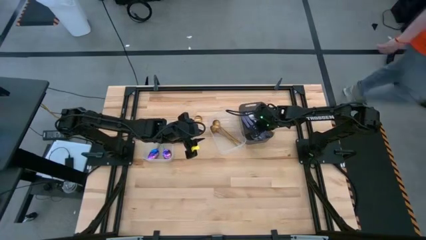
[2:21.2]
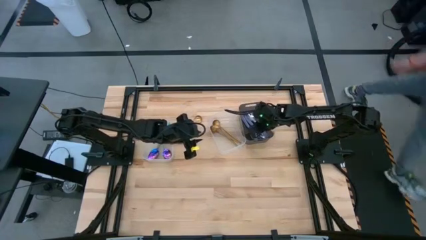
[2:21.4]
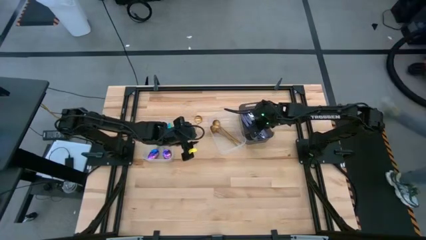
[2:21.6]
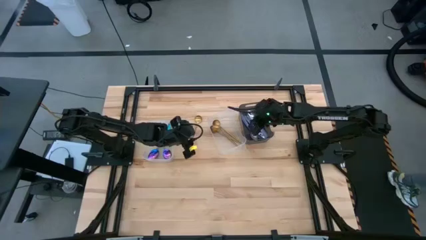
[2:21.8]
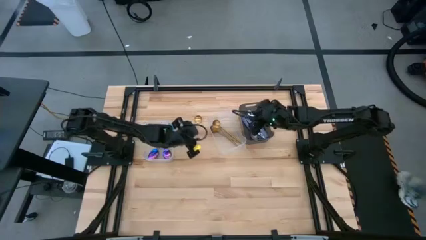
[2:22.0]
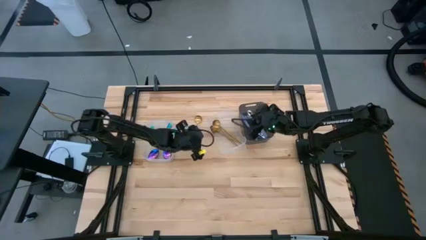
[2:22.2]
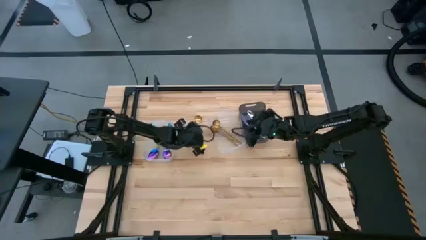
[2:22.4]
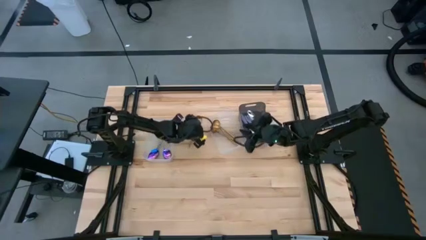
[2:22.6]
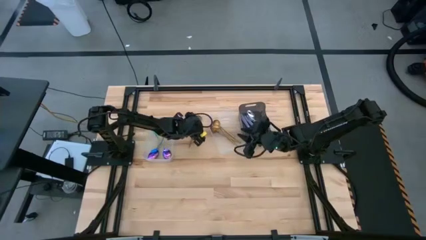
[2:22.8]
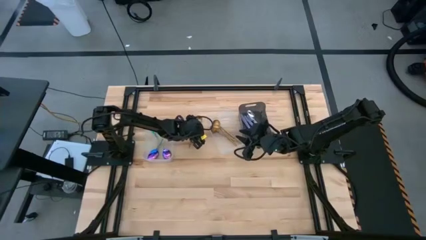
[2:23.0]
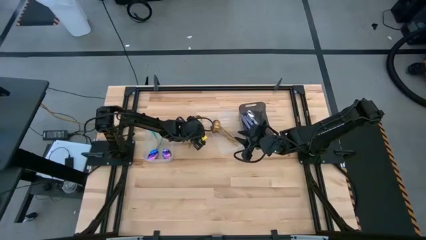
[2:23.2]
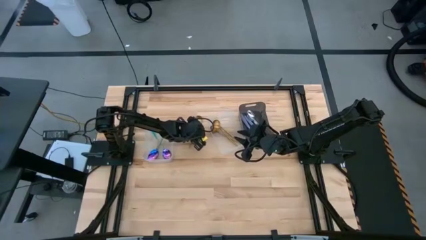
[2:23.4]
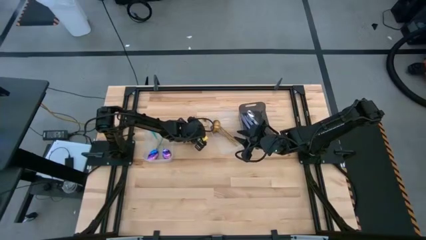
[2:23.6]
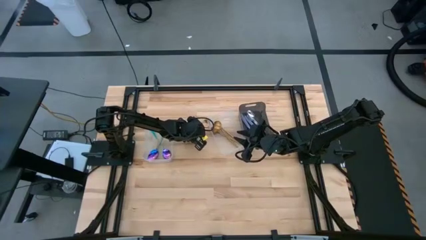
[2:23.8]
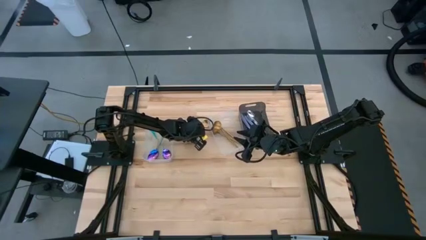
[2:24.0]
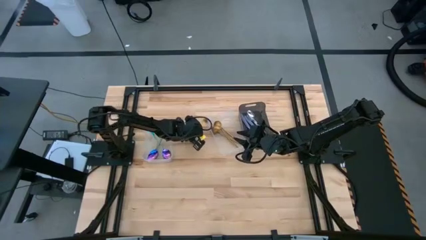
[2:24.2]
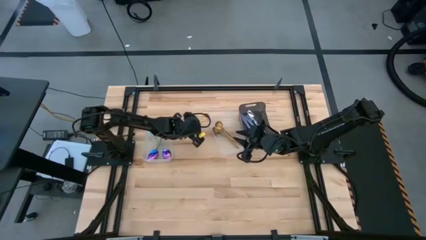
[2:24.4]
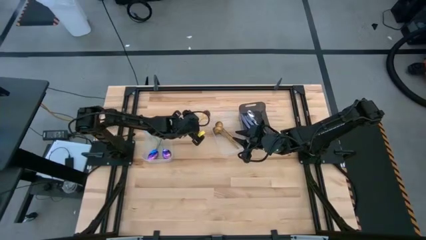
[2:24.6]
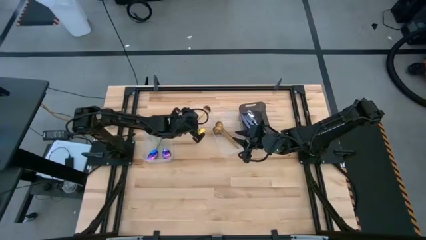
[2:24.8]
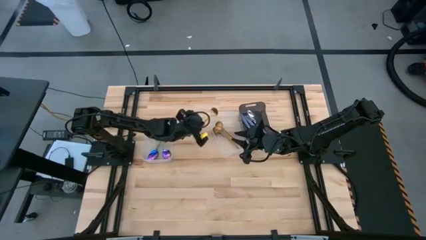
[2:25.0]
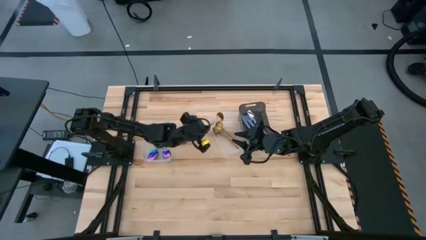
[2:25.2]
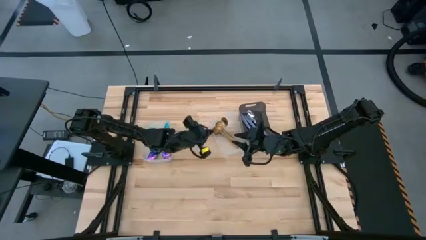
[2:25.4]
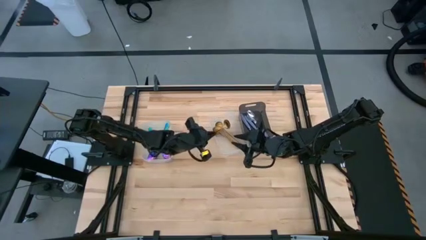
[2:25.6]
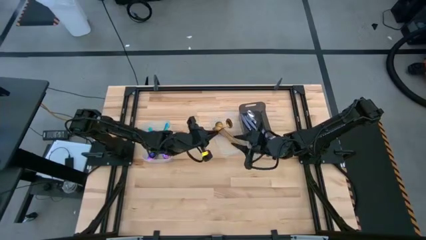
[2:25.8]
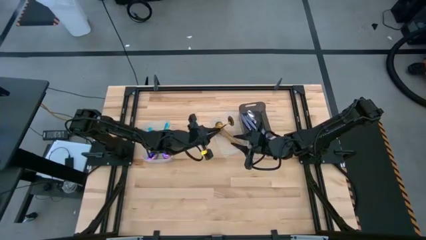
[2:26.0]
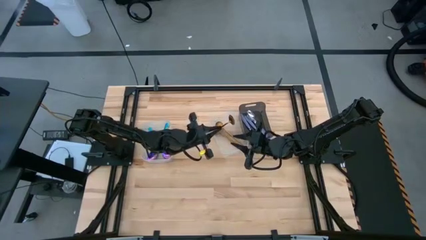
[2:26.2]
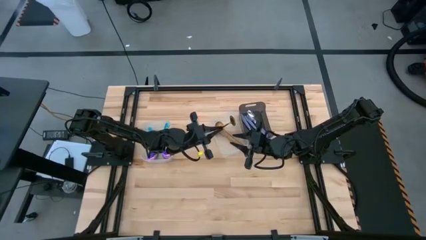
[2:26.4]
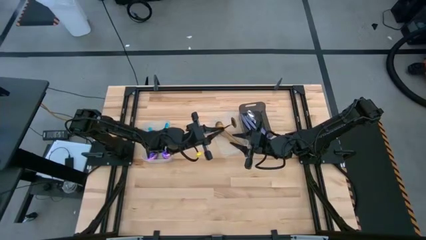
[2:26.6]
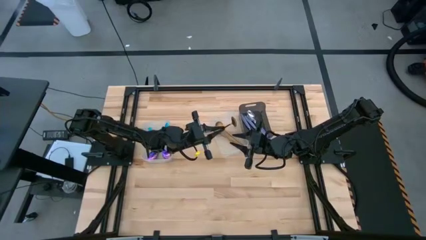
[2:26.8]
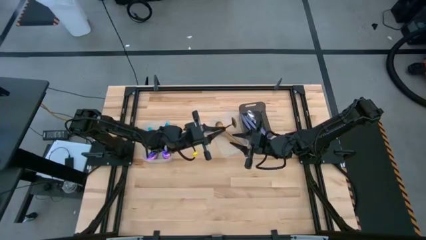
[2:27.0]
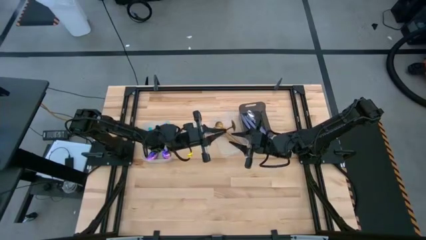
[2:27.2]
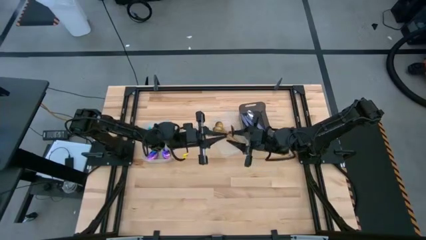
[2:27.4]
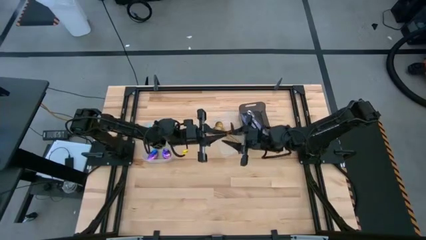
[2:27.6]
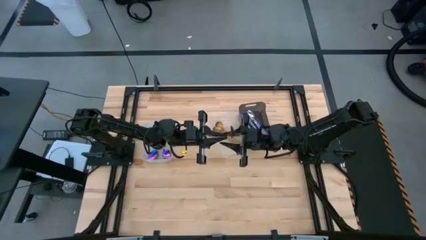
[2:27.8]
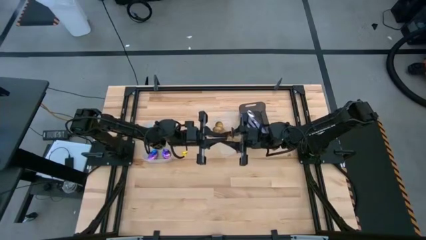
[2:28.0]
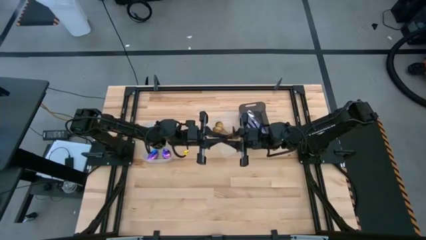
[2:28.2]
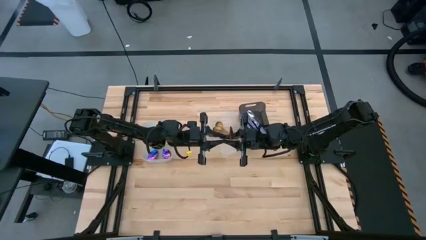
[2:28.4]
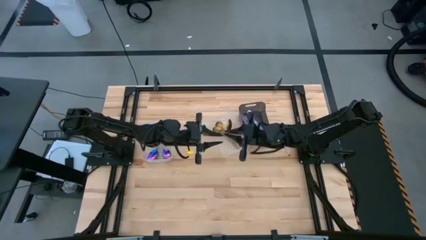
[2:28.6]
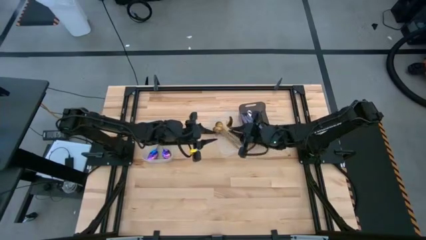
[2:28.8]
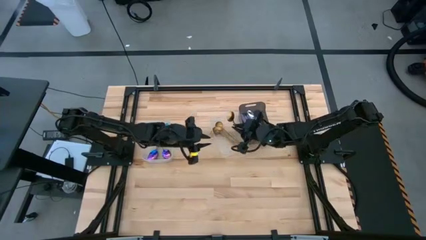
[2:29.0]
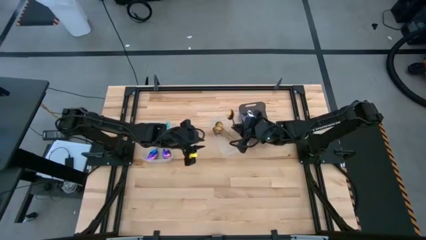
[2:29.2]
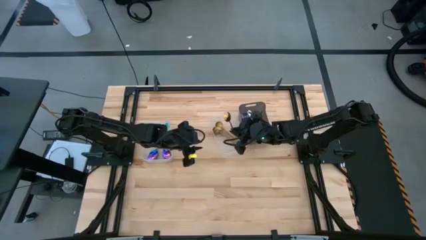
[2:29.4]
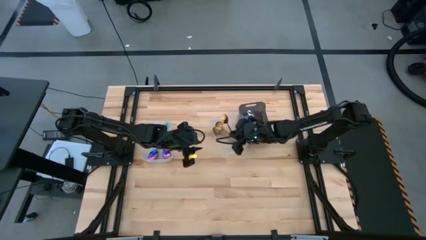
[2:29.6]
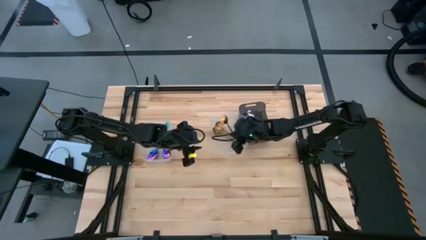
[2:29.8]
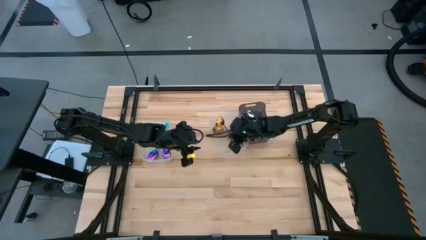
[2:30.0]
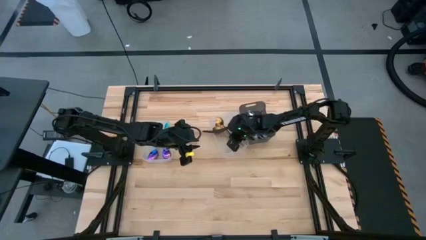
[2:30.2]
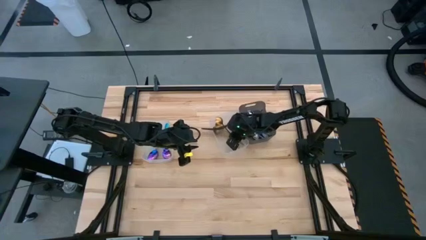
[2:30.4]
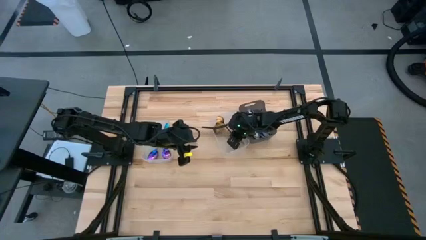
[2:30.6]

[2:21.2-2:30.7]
Task: Sort silverware by color (type)
Put the gold spoon into the right transparent bin

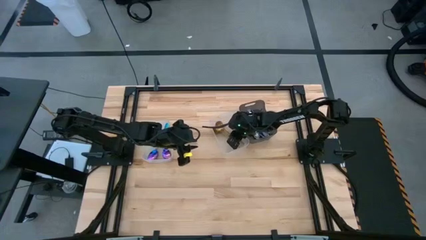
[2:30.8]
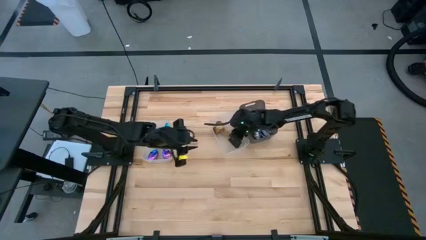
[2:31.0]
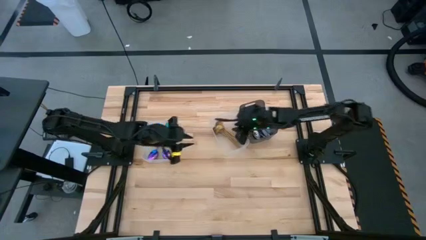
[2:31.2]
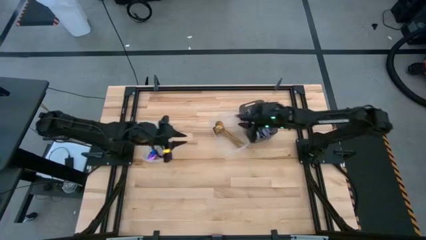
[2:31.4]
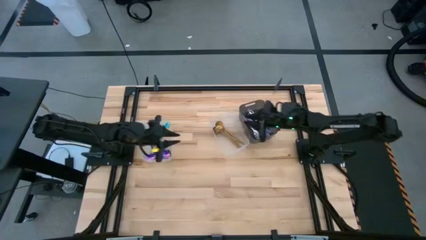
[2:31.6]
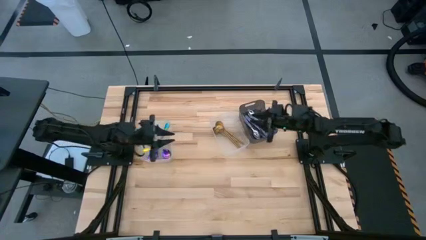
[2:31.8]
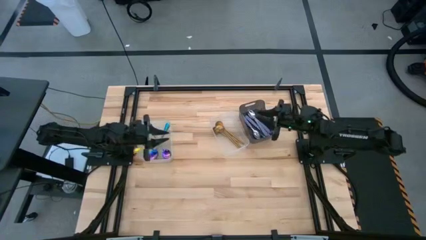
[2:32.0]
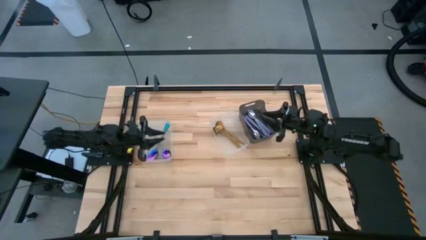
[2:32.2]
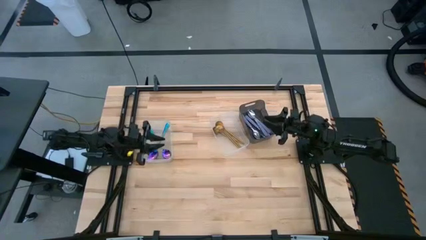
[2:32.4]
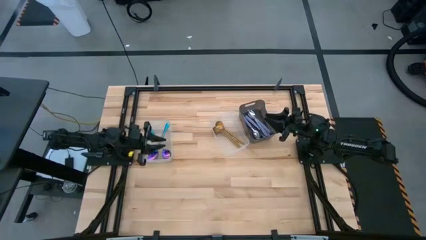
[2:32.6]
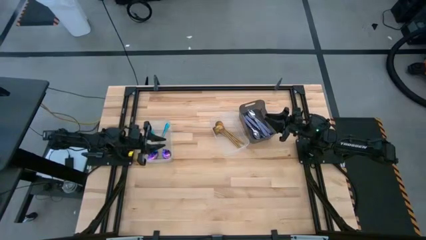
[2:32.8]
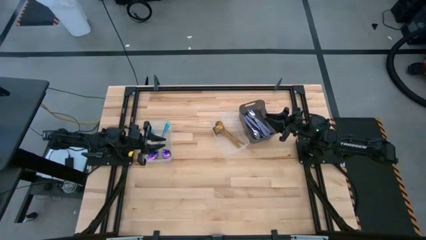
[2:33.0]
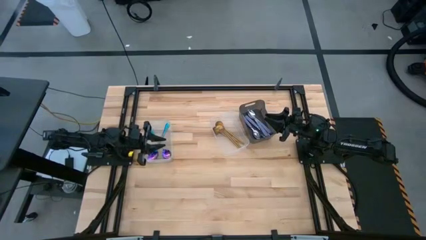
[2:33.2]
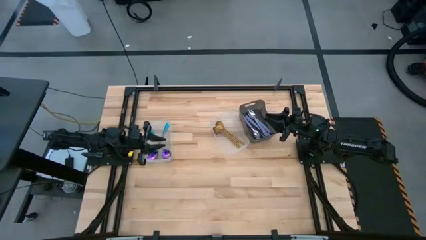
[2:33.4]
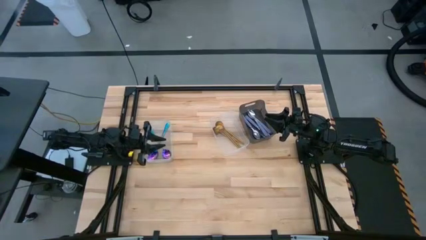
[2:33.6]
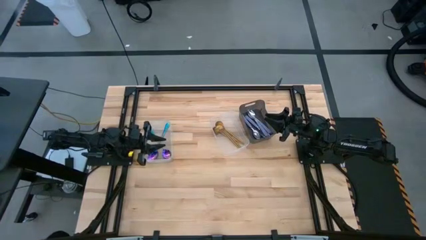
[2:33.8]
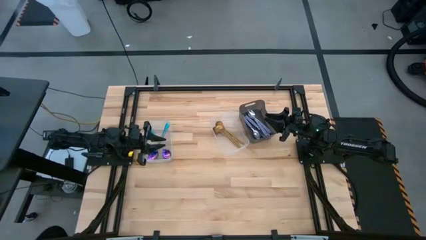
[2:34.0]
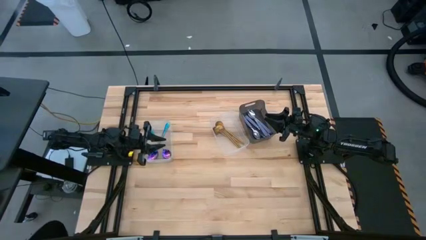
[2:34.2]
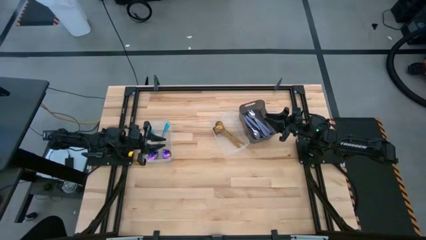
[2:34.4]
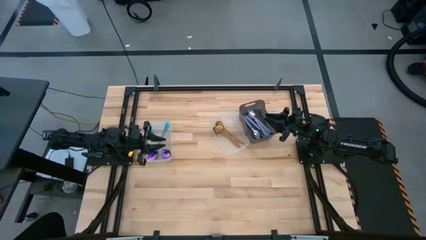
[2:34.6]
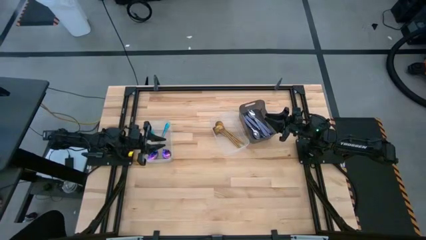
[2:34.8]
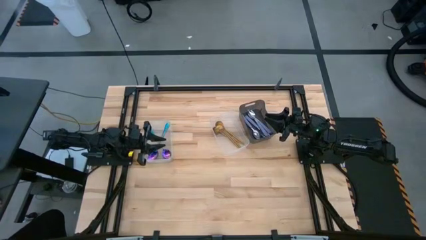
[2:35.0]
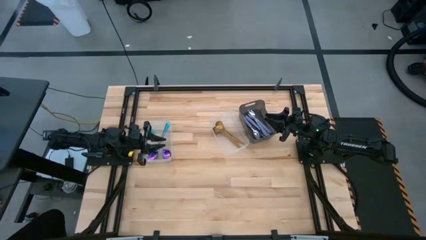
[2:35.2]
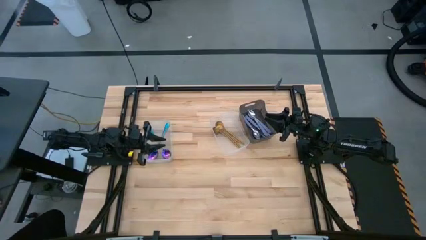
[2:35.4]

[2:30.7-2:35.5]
Return to Home Position

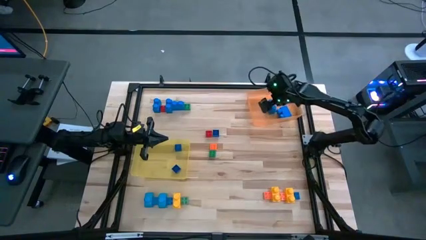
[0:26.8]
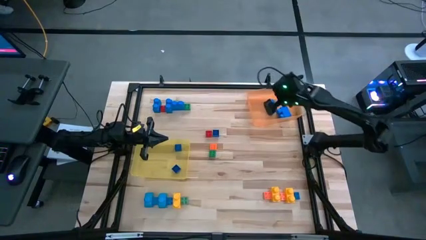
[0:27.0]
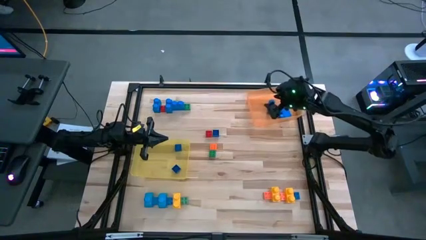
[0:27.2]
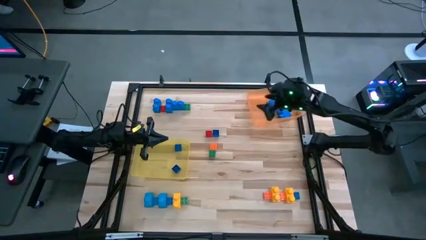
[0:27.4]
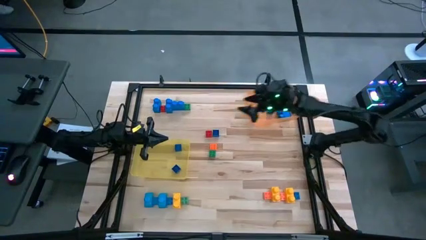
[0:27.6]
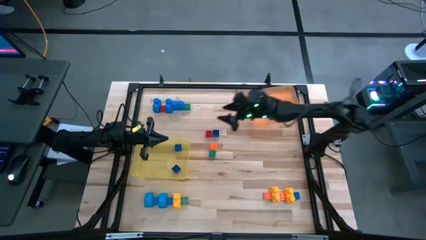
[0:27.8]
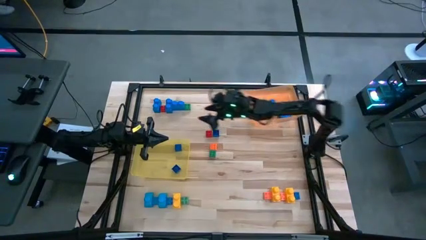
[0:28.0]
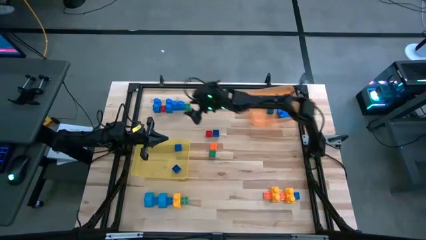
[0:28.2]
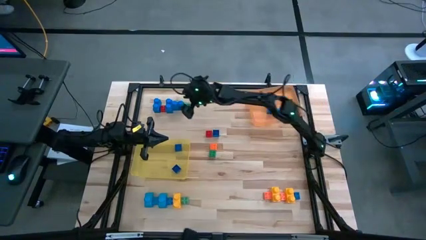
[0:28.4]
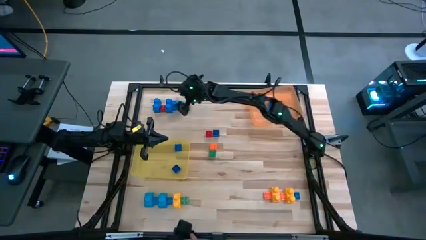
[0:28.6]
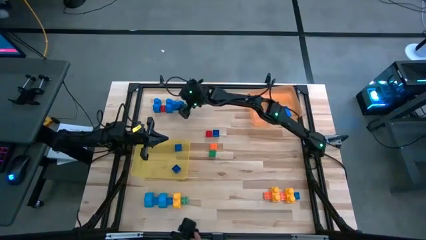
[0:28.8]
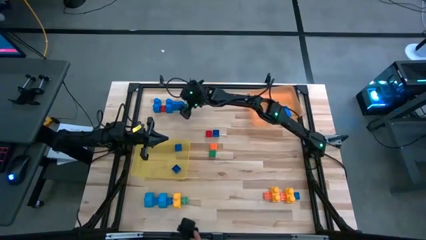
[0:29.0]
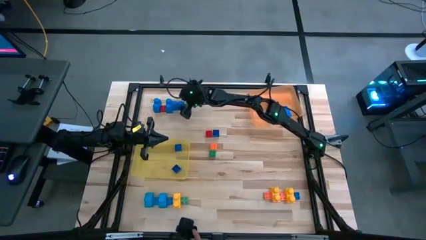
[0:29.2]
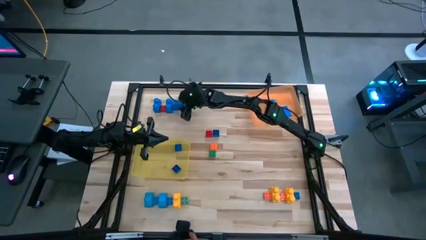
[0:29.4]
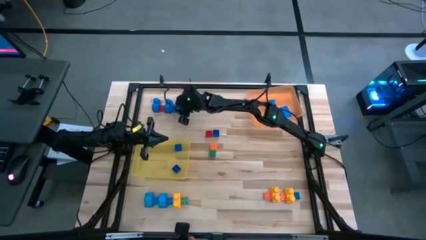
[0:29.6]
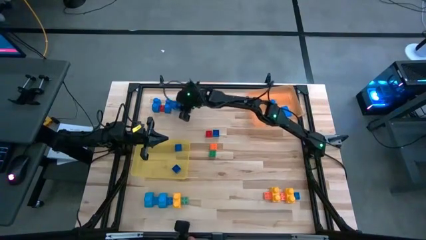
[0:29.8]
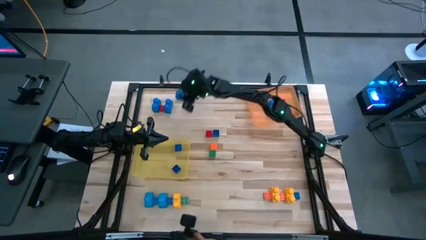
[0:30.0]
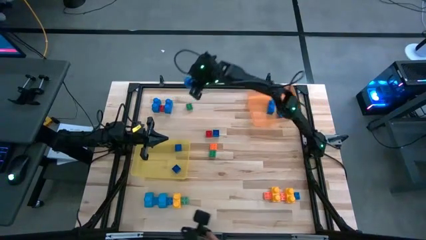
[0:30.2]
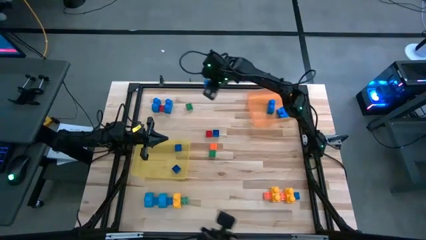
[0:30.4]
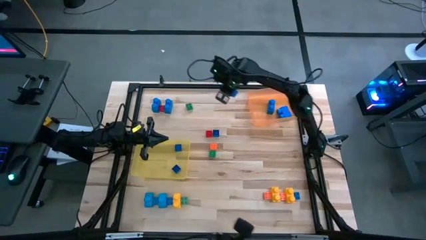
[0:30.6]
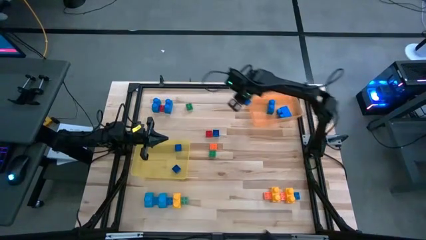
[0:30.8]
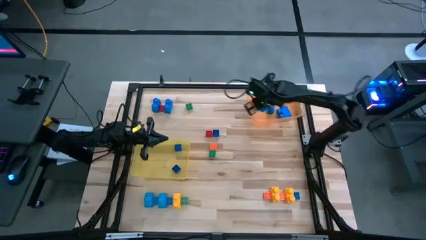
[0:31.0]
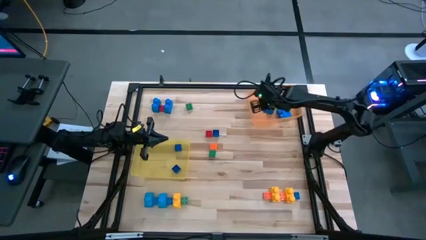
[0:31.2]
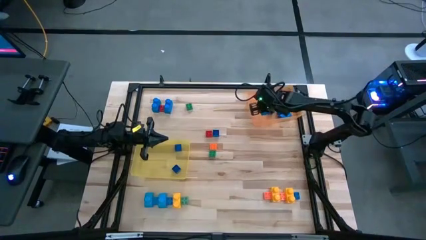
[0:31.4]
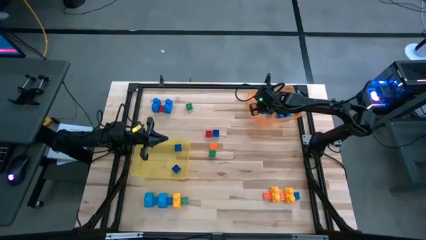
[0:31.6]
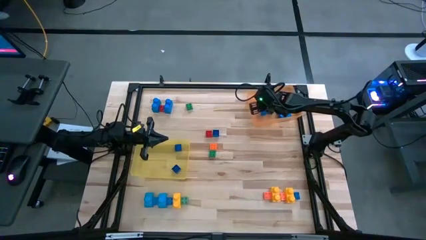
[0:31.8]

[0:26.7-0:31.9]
Task: Sort blocks by size
Put the large blue 2 stud game piece into the orange bin
